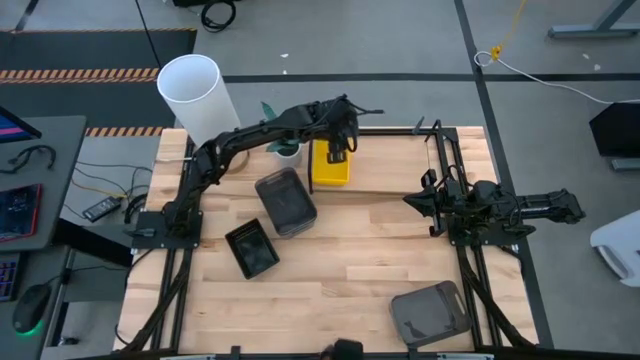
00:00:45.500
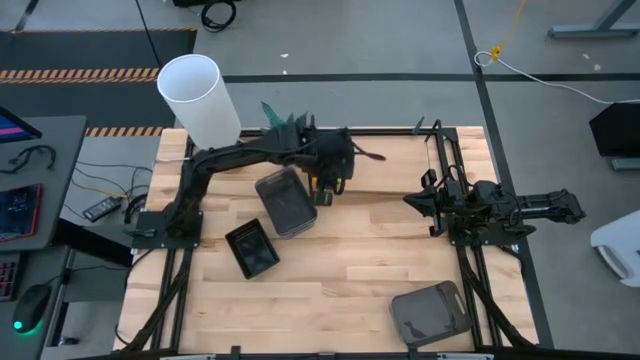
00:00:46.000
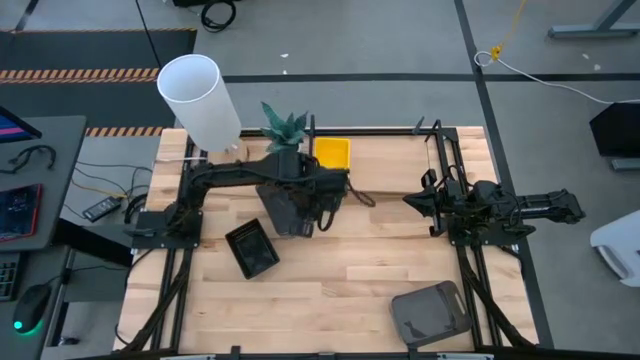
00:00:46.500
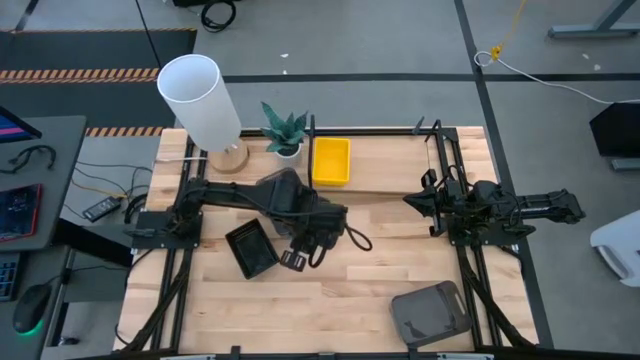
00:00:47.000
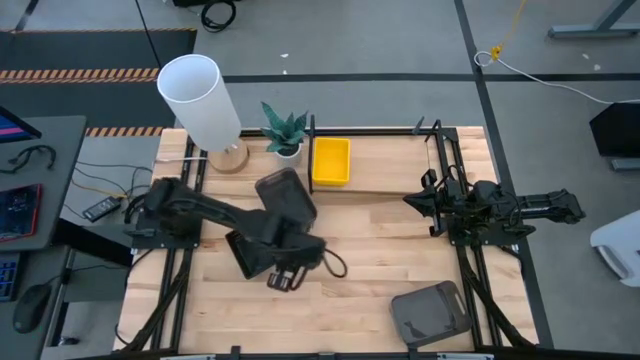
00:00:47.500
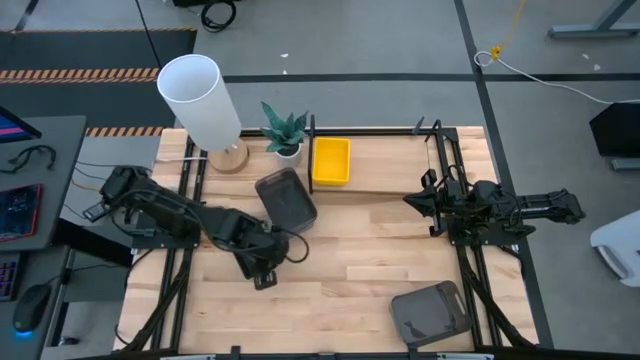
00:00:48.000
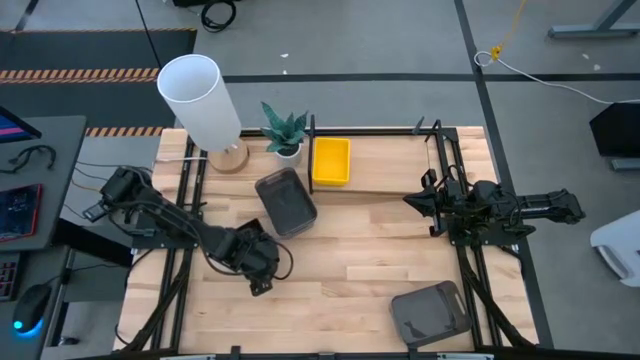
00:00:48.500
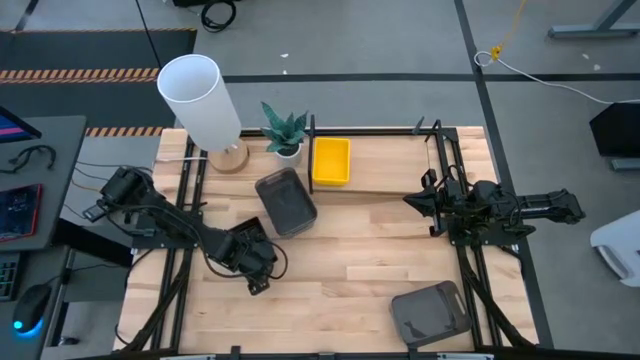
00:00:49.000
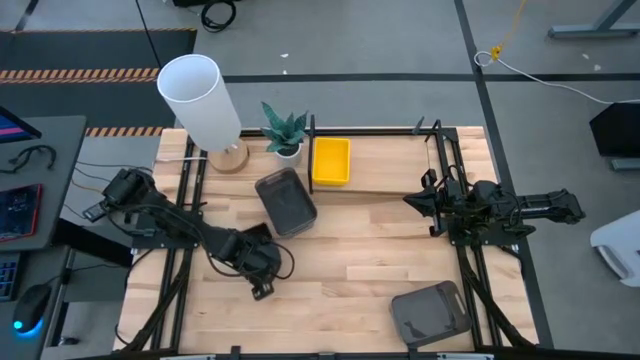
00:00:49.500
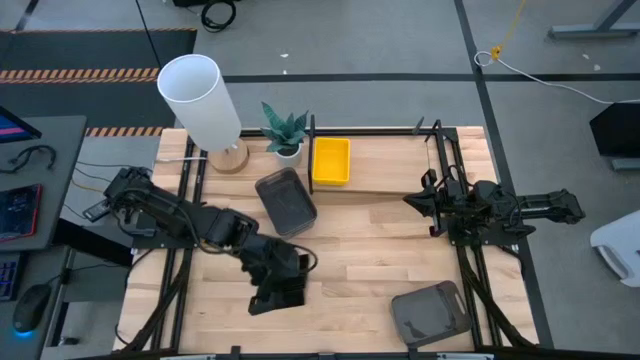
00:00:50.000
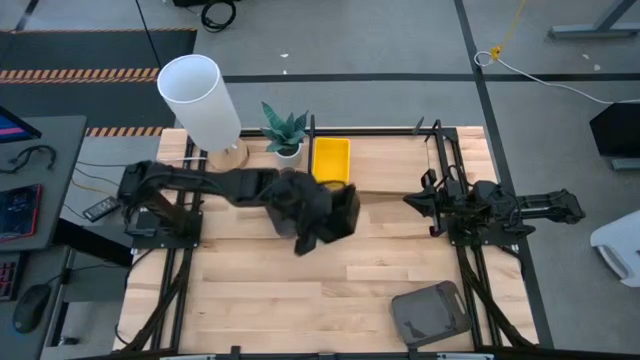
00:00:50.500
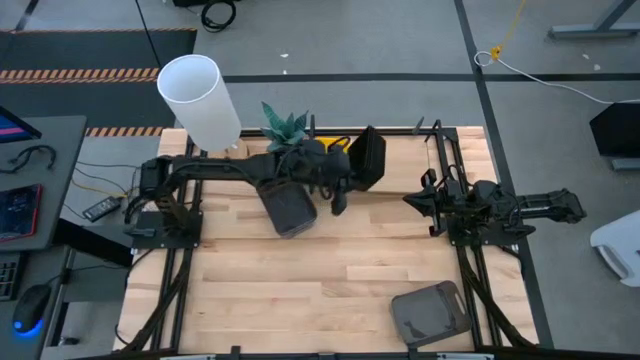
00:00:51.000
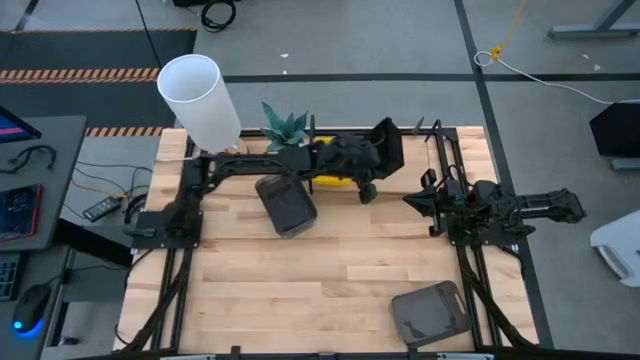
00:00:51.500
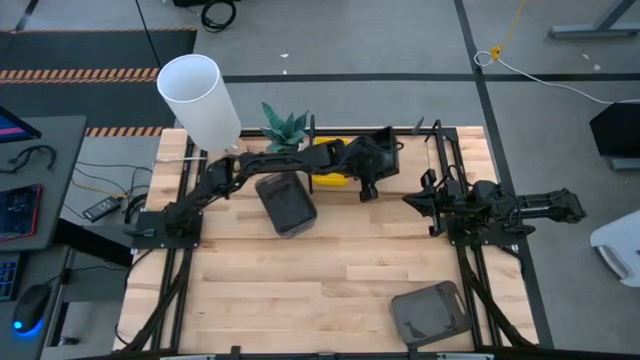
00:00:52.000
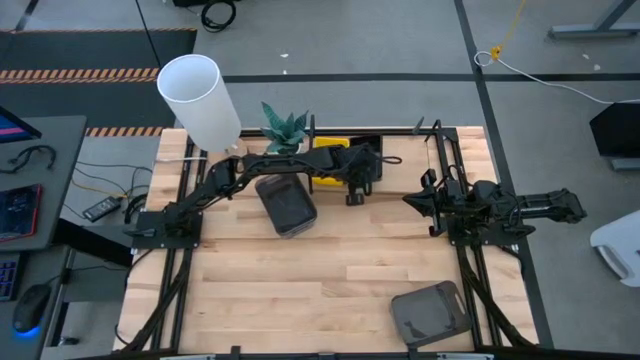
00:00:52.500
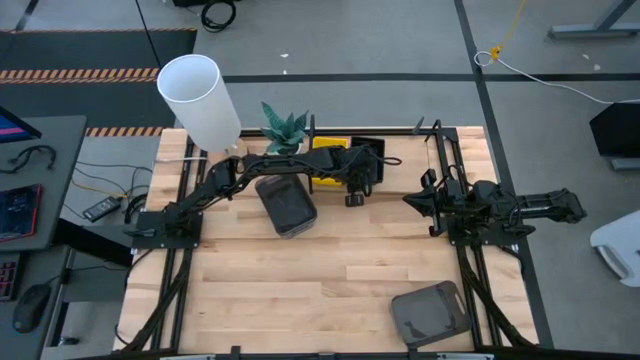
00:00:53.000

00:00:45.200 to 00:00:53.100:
Task: Stack baskets on shelf by color
Put the stacked black bins on the shelf

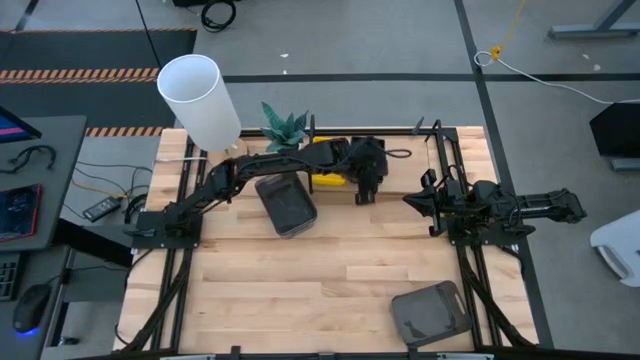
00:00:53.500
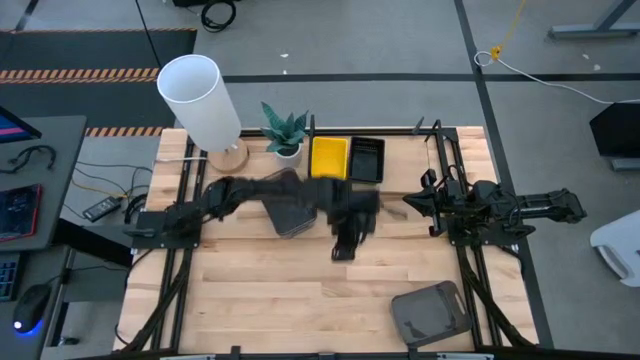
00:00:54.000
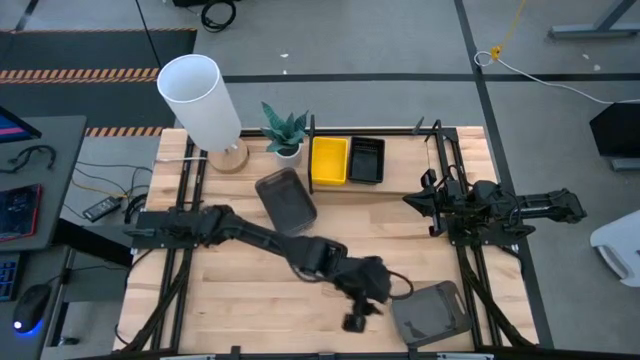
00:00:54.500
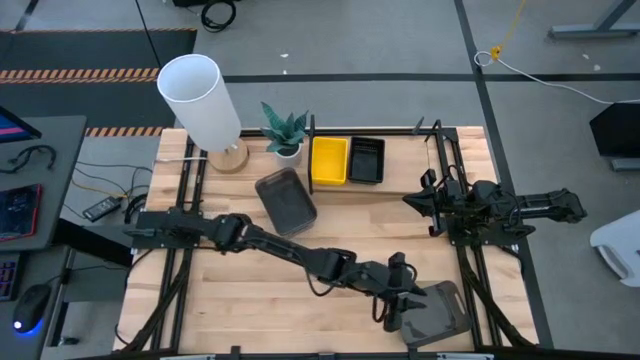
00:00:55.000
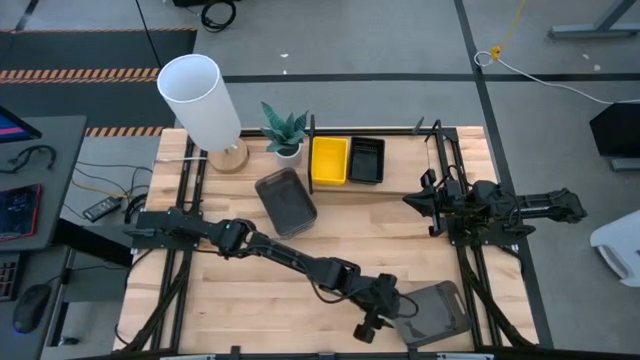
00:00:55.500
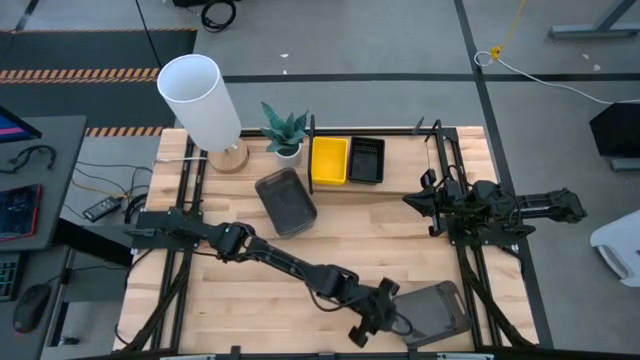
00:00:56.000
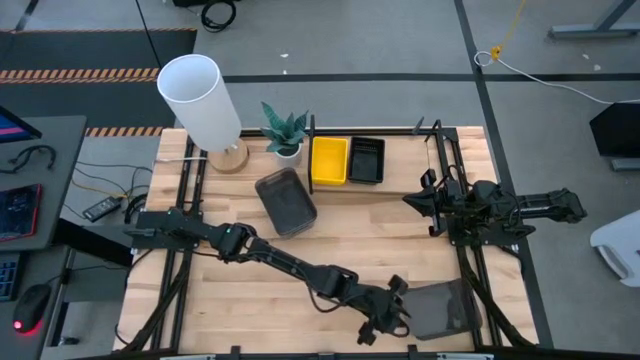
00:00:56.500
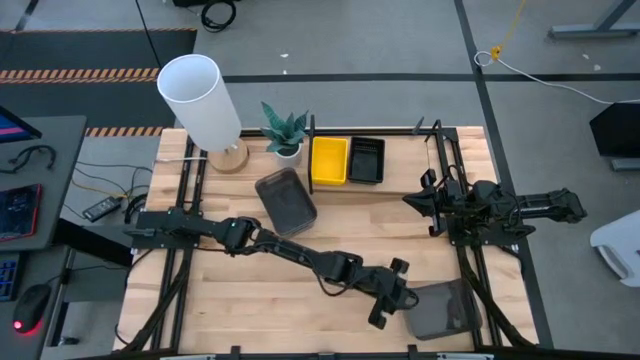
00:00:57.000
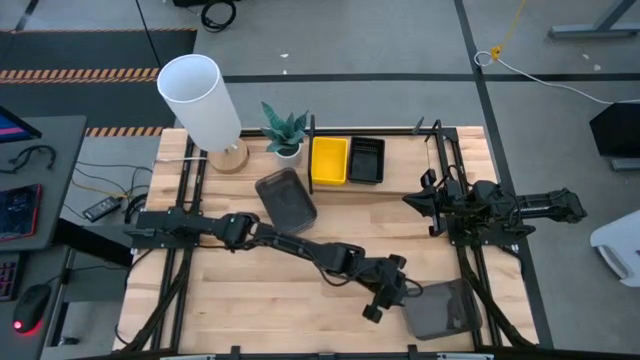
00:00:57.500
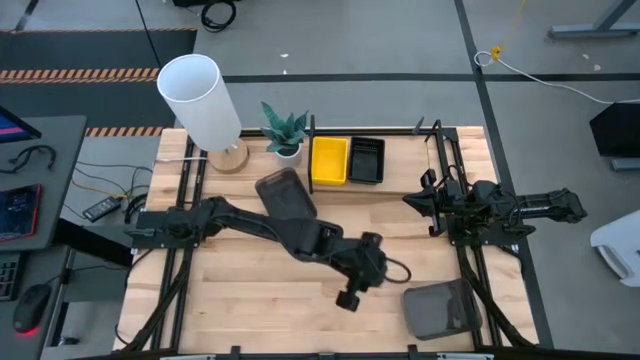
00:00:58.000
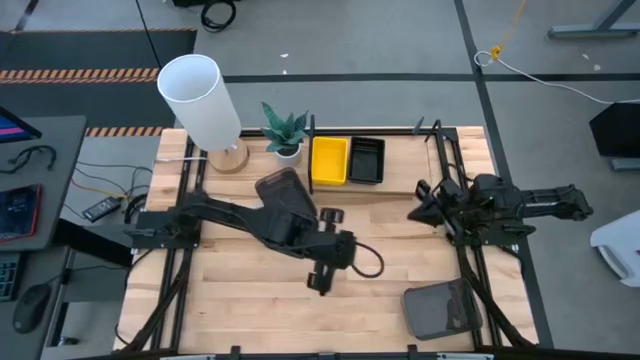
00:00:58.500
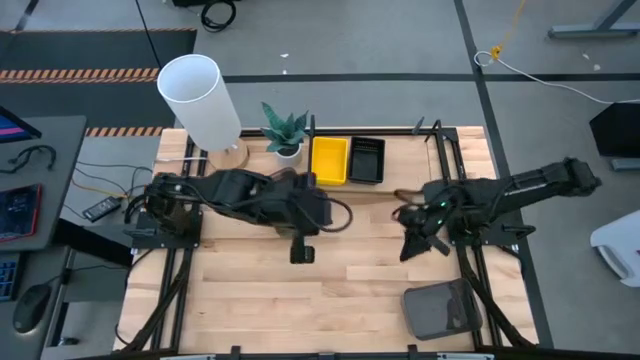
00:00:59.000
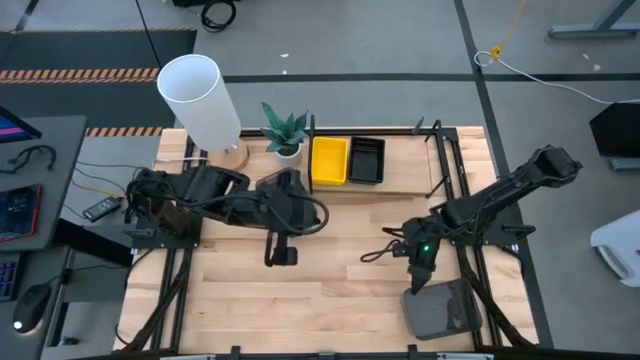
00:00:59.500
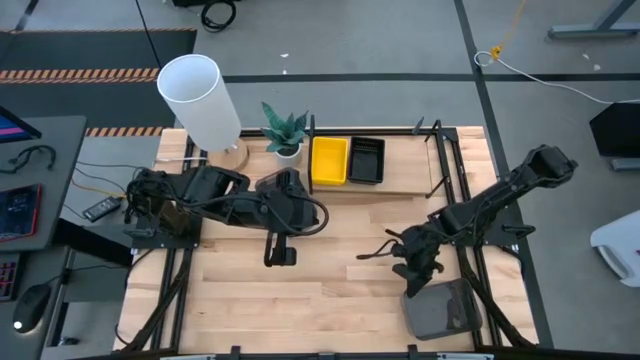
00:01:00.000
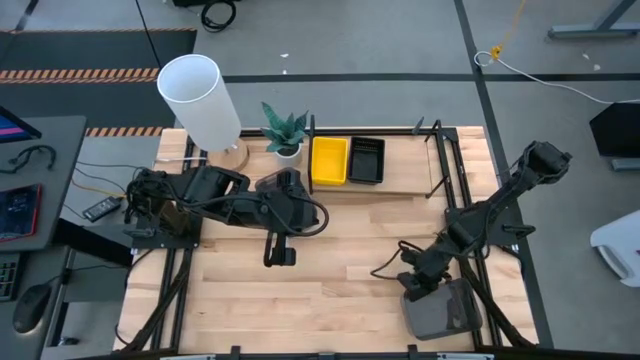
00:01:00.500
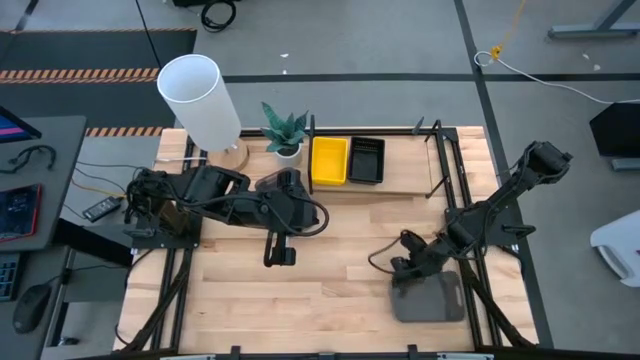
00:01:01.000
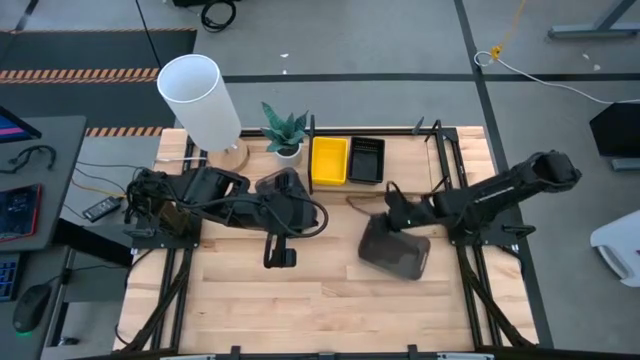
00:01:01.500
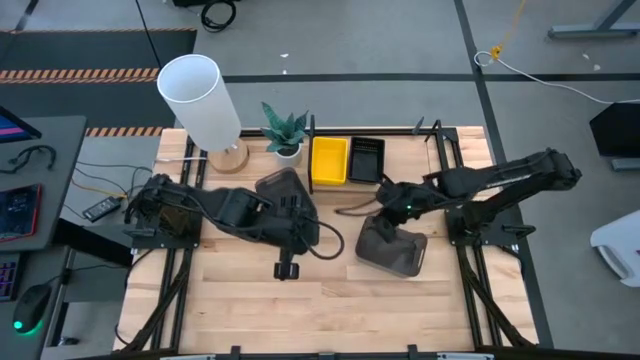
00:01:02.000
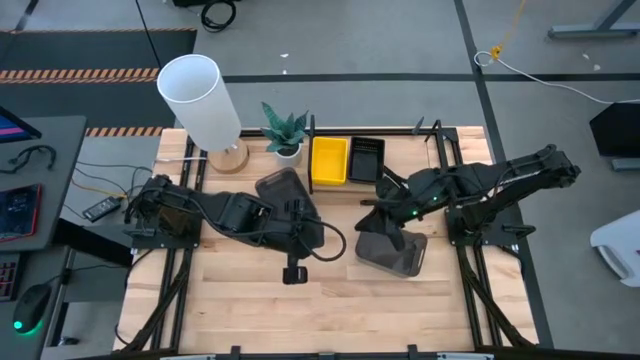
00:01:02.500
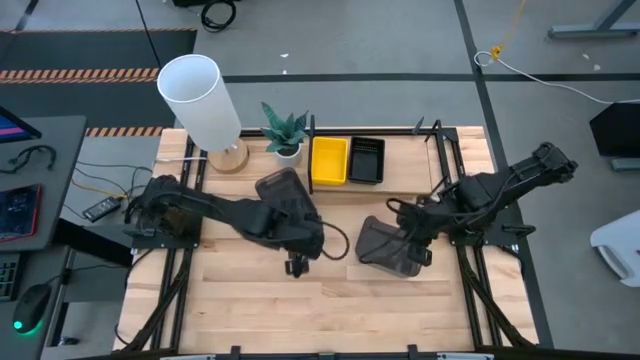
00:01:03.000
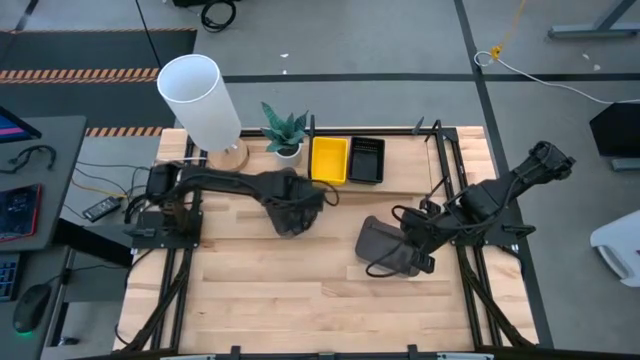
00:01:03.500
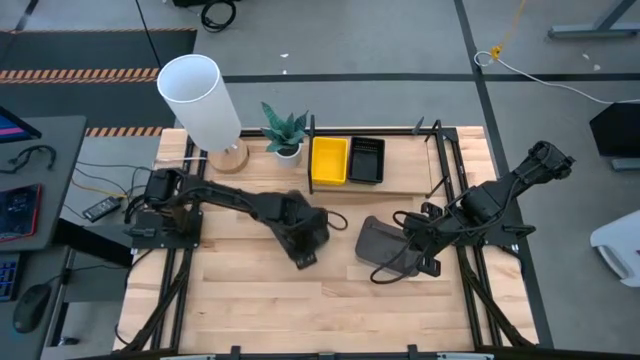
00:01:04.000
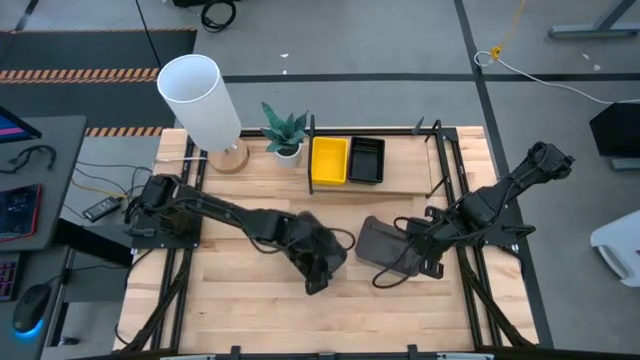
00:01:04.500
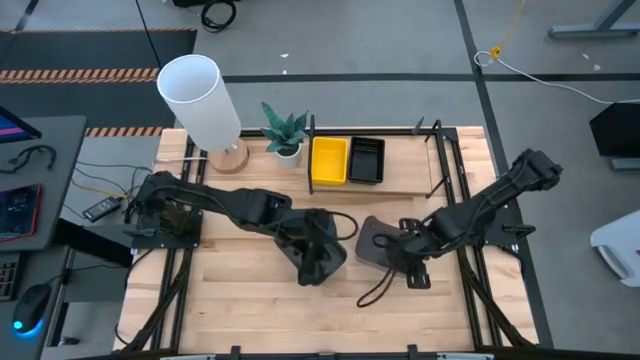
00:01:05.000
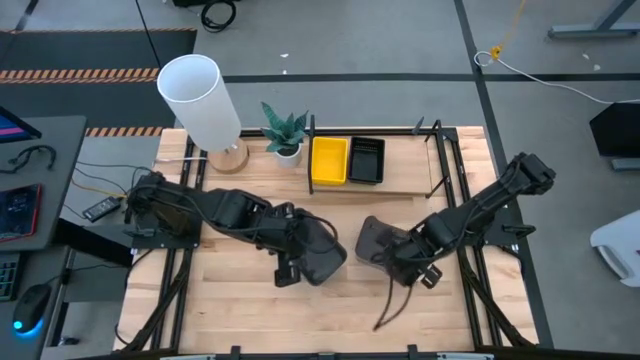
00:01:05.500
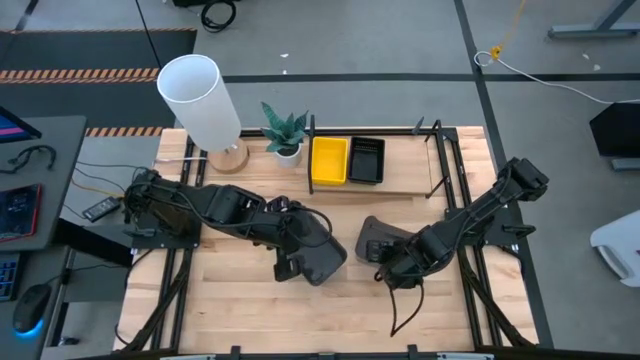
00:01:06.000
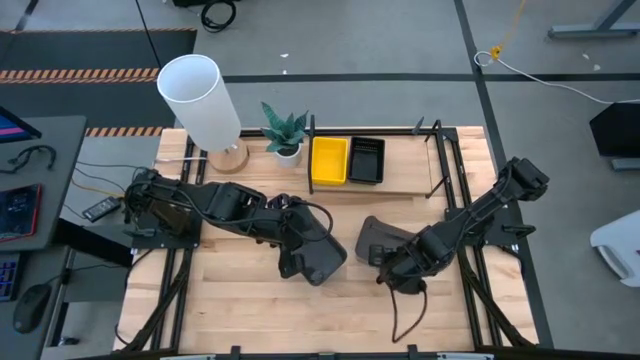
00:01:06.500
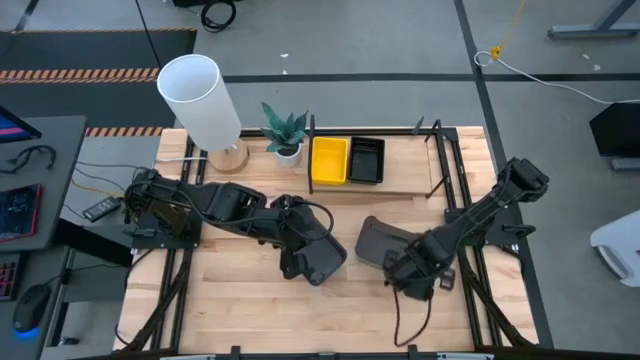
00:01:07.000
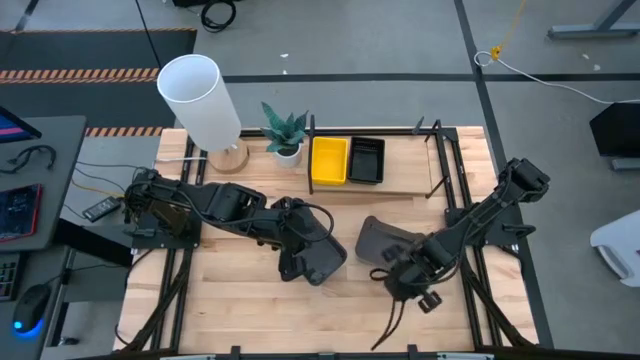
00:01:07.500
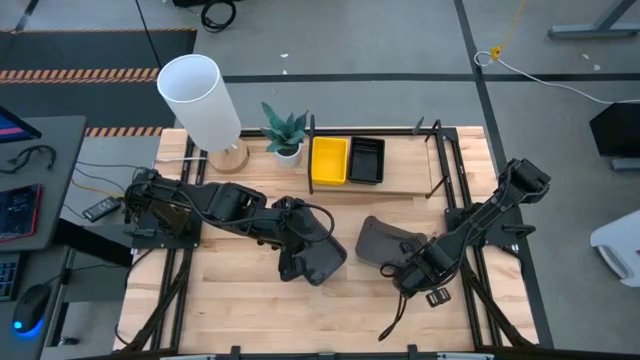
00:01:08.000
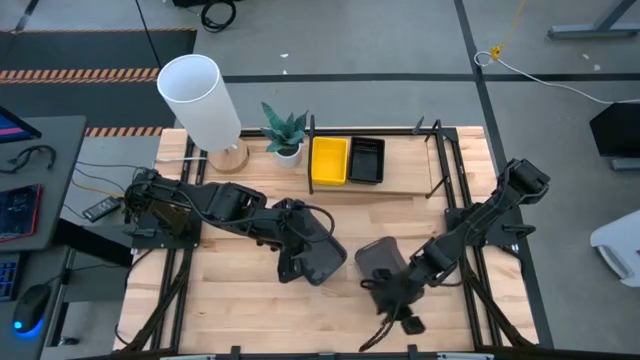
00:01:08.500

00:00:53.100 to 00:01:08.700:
Adjust the black bins on the table
